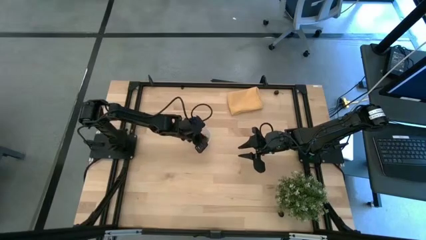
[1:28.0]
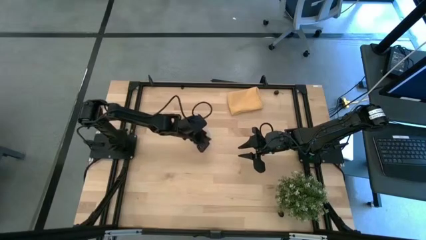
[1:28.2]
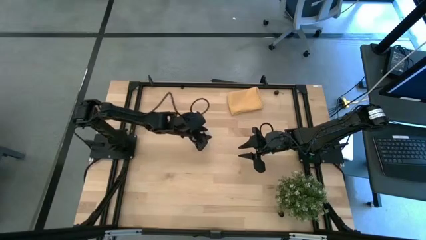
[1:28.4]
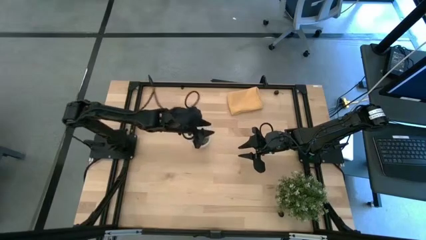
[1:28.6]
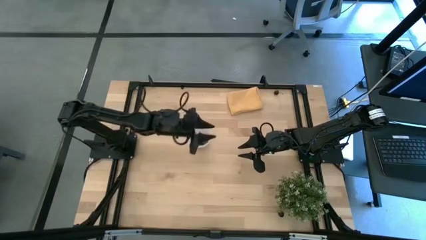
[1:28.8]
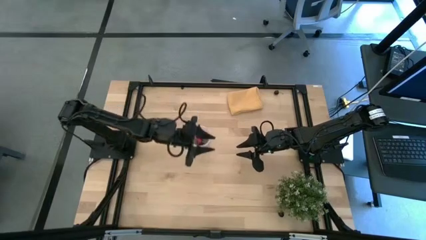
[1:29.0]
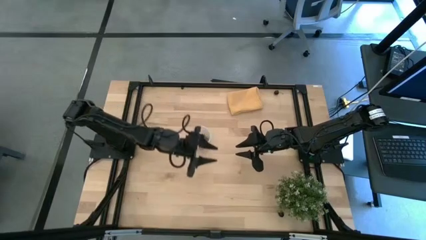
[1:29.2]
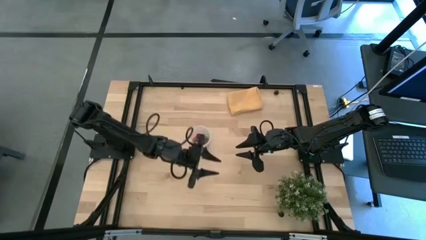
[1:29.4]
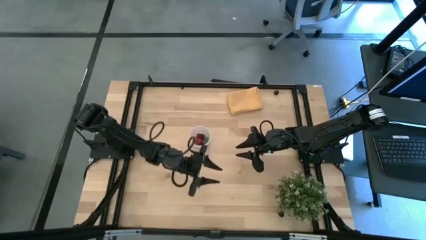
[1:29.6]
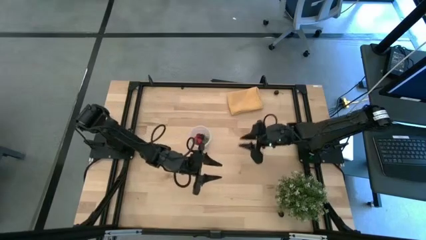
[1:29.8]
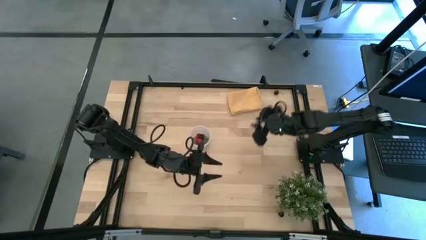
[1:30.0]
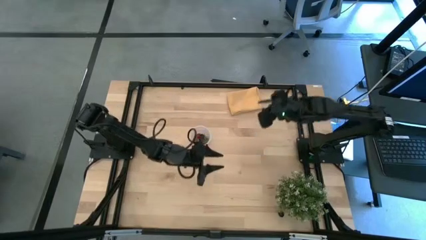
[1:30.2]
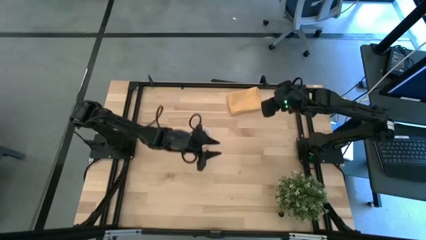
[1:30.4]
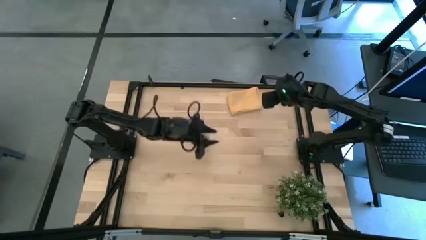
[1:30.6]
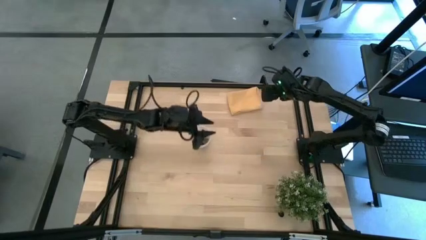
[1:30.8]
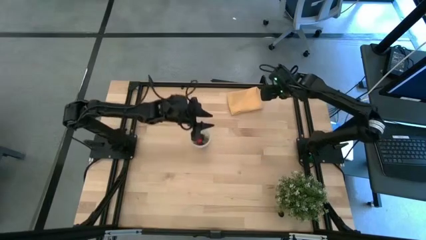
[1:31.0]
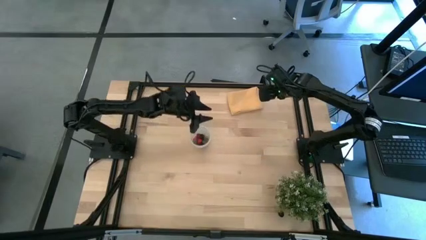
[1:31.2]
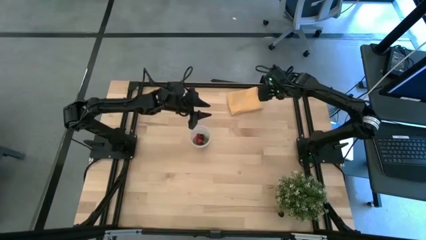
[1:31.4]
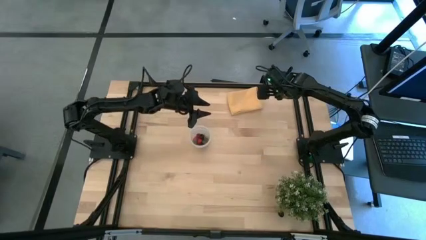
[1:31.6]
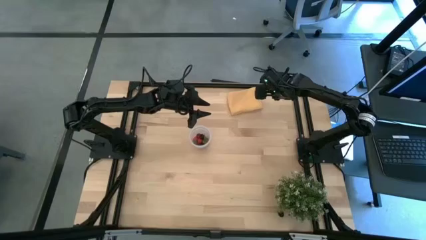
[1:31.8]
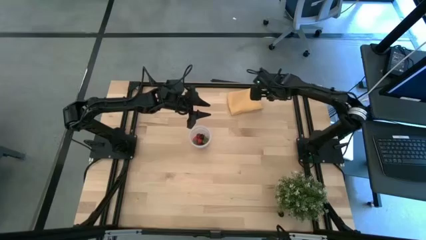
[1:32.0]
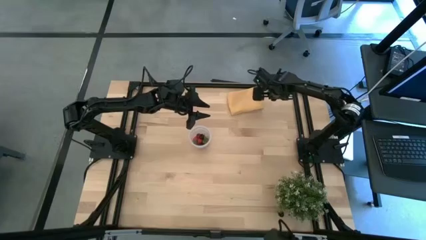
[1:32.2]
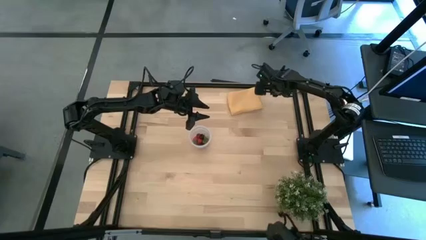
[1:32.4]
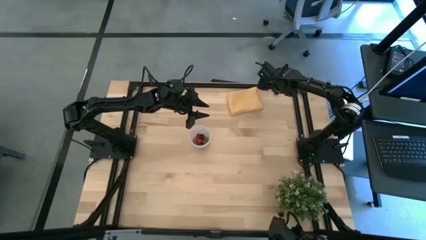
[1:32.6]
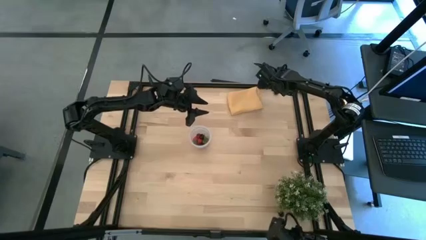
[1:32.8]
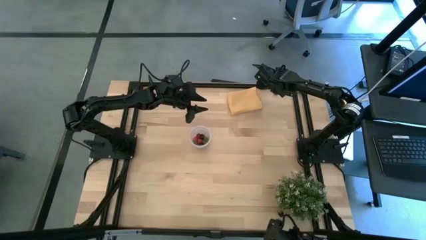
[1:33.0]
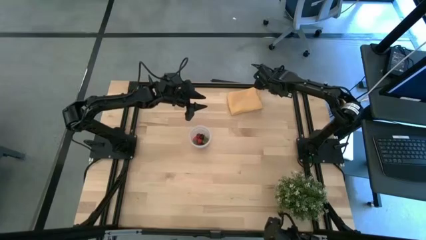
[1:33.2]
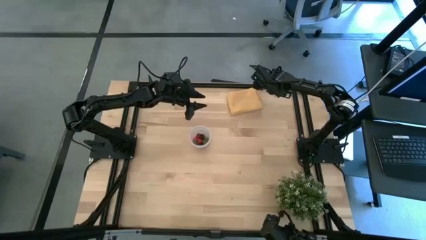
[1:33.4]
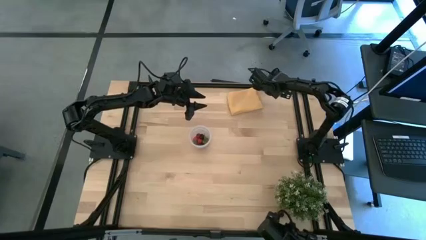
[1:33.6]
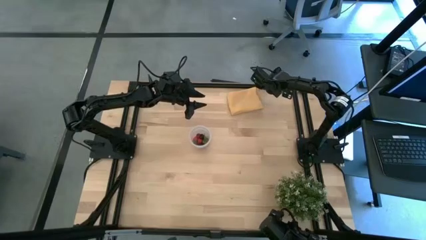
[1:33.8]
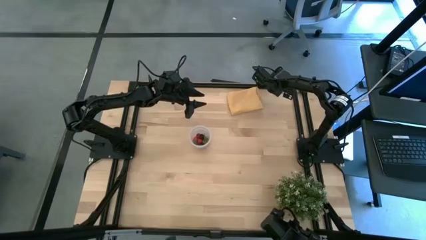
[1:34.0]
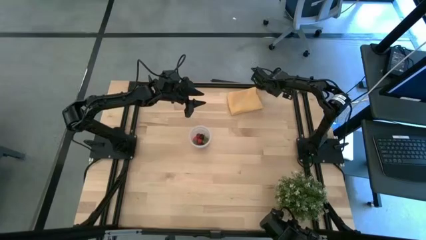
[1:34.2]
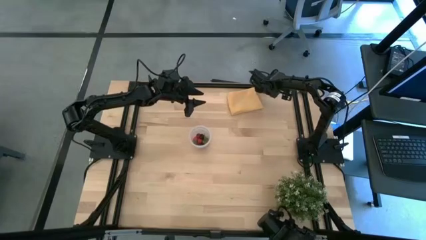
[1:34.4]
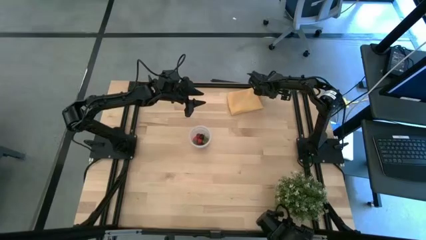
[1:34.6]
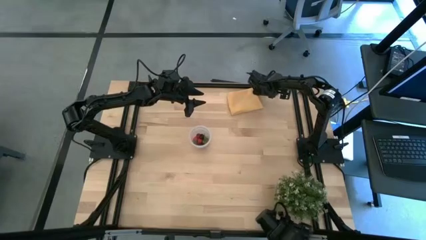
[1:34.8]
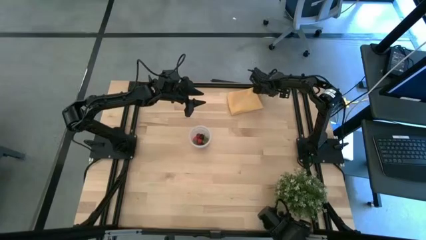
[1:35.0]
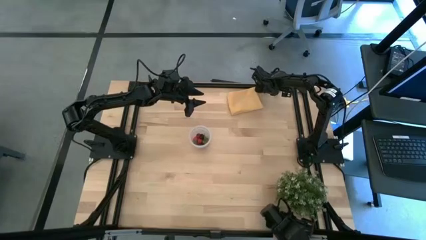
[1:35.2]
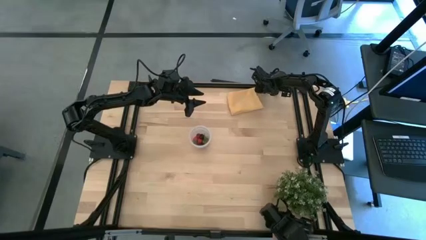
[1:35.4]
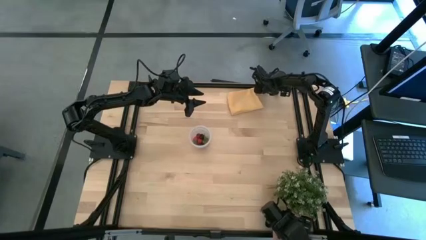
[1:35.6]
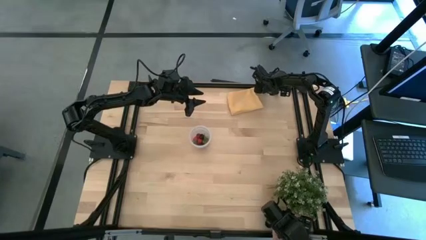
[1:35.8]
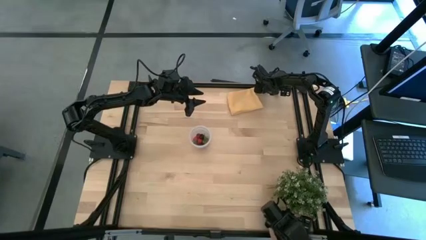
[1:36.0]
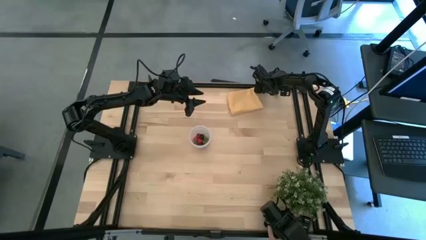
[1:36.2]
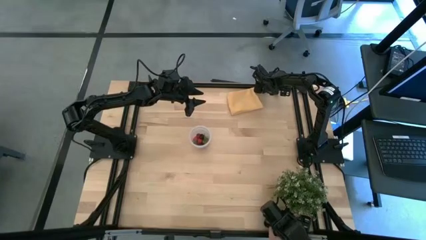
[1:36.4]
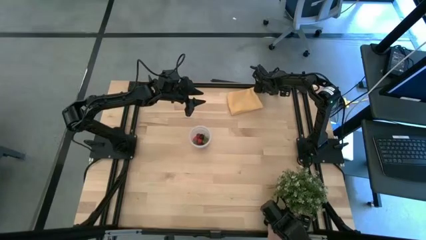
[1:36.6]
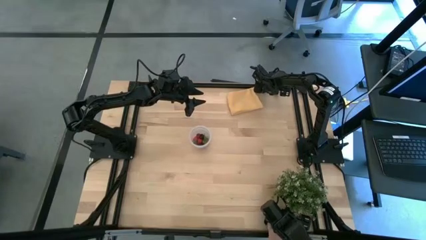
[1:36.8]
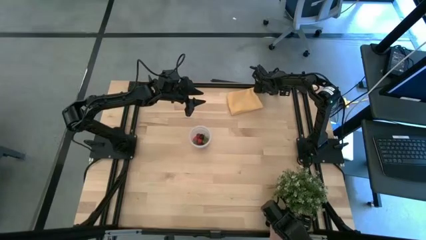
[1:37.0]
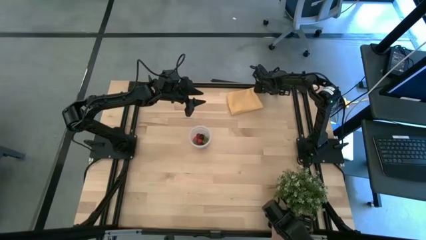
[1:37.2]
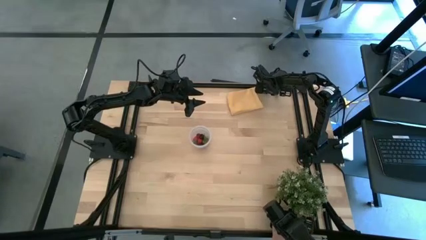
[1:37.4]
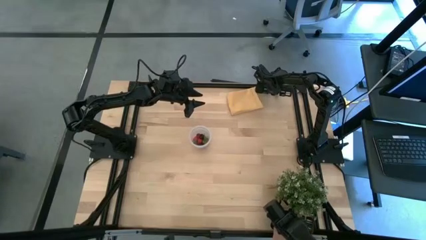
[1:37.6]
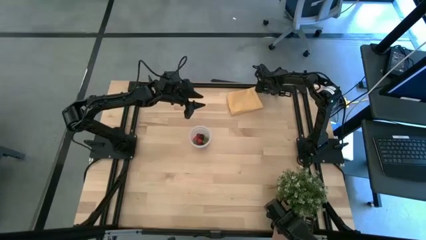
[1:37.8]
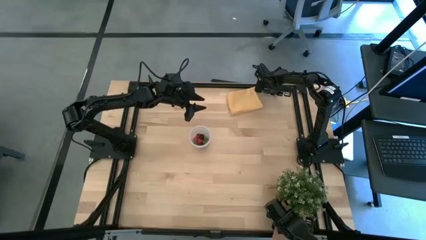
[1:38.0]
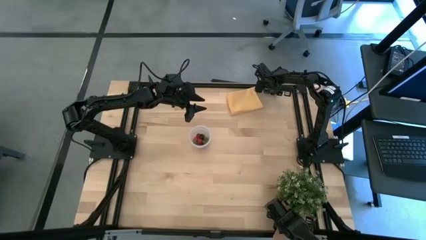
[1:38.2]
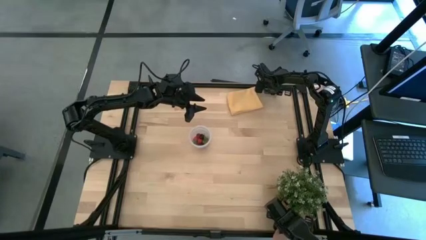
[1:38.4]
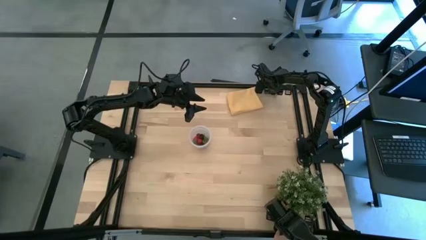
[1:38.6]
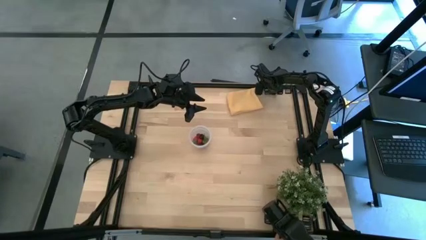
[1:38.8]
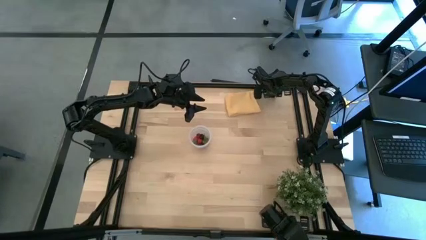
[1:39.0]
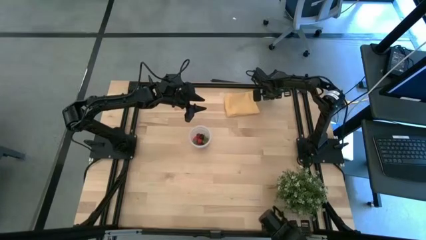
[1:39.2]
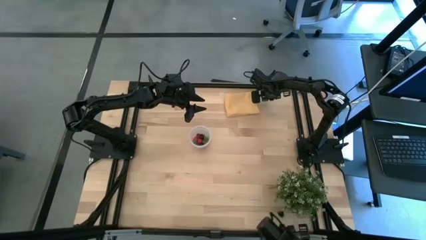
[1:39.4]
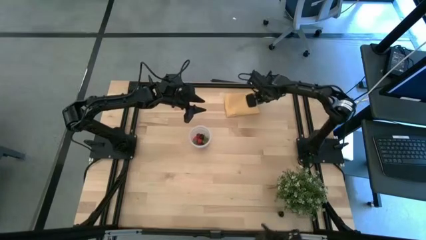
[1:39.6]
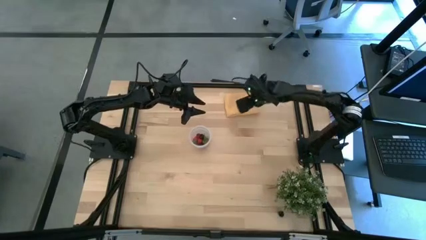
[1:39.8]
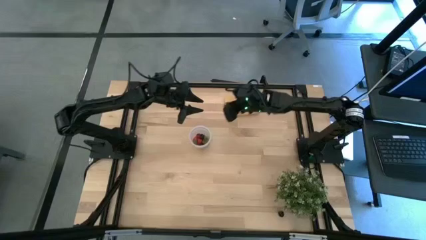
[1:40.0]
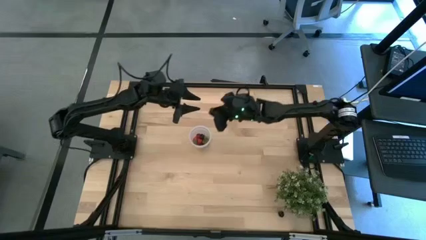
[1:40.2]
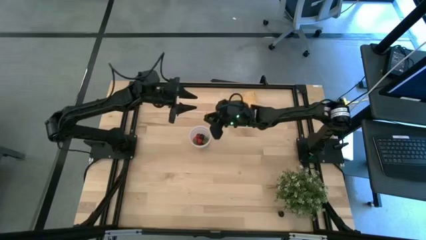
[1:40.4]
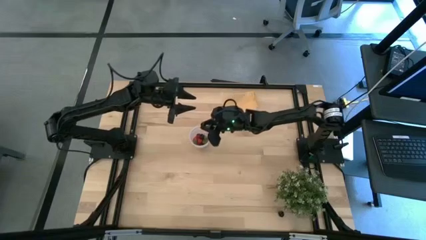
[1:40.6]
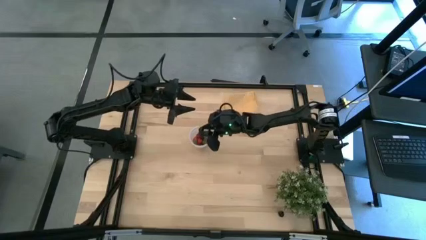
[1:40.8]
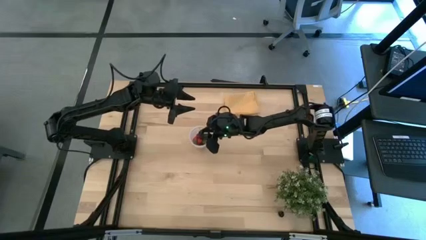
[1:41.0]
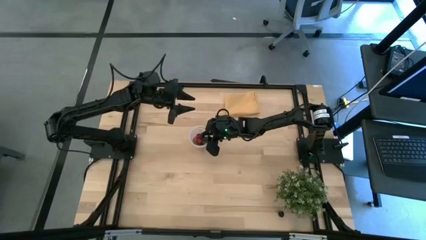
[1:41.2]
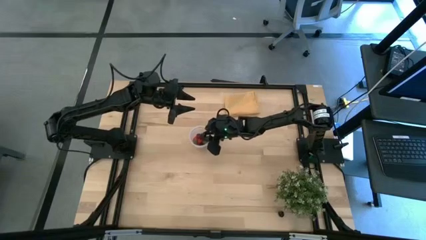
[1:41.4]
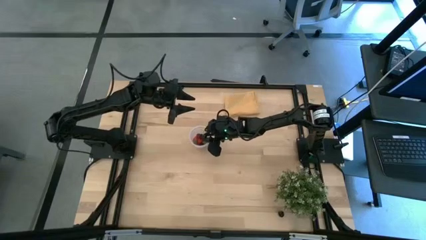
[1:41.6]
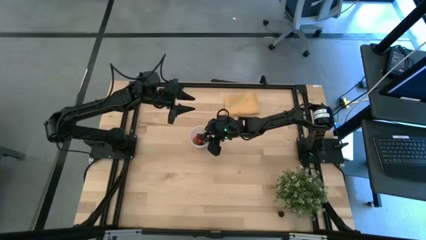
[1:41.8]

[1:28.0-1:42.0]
Task: Pick and placing Produce into tupperware
Put the top black cherry into the transparent container

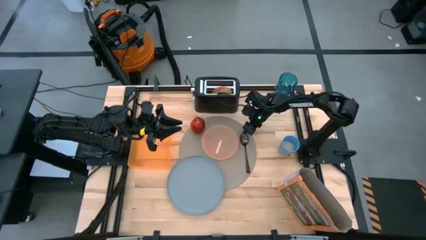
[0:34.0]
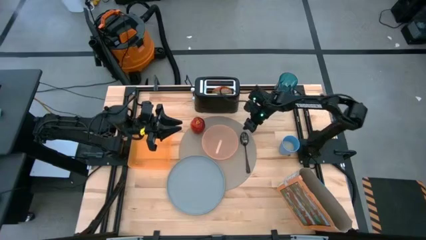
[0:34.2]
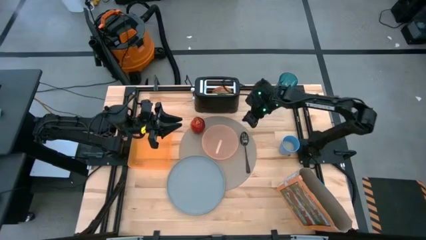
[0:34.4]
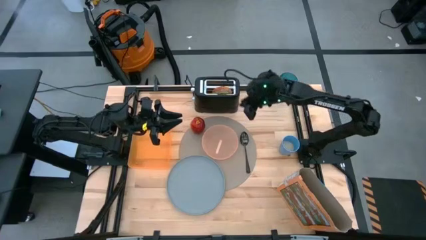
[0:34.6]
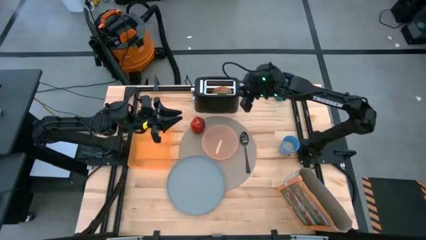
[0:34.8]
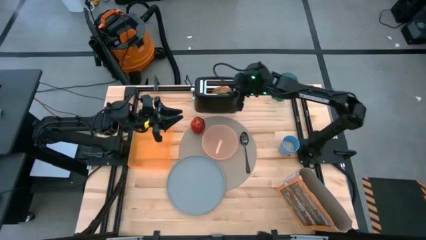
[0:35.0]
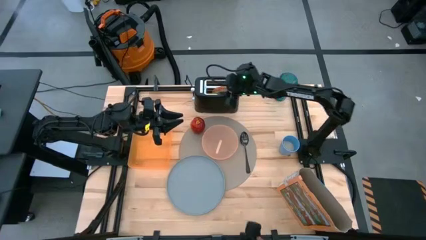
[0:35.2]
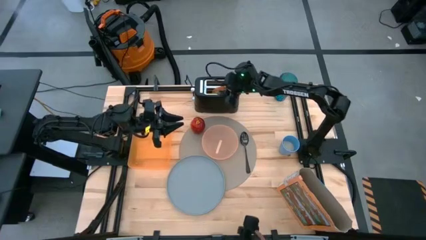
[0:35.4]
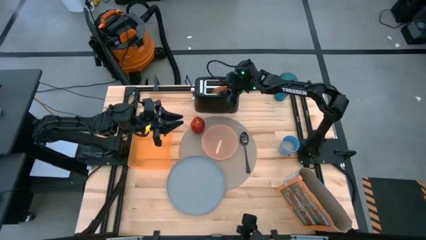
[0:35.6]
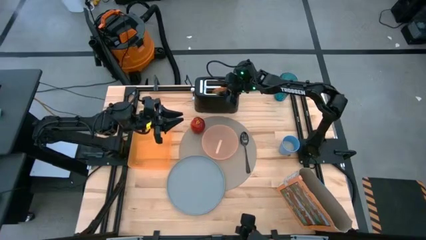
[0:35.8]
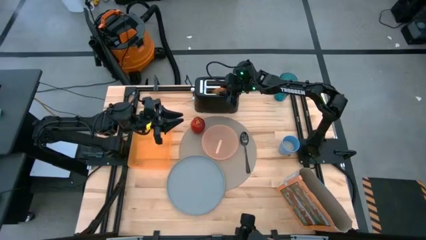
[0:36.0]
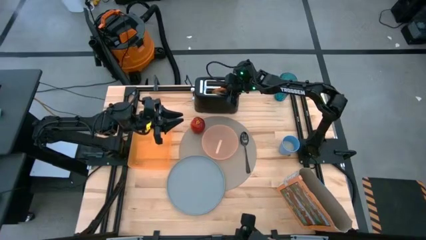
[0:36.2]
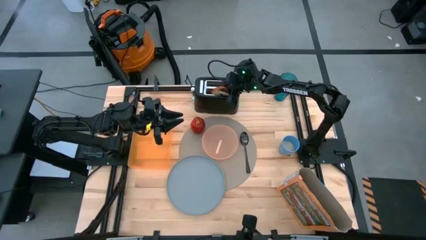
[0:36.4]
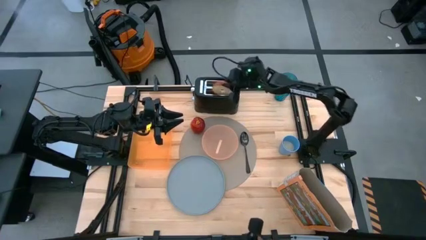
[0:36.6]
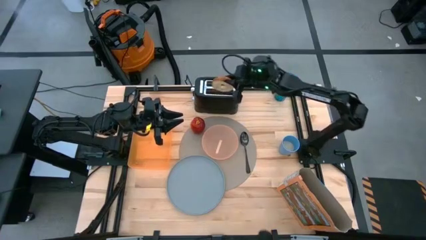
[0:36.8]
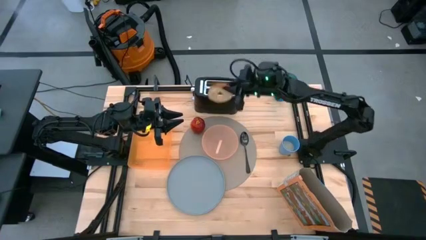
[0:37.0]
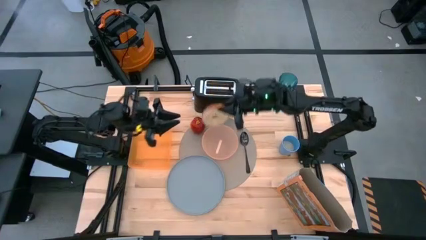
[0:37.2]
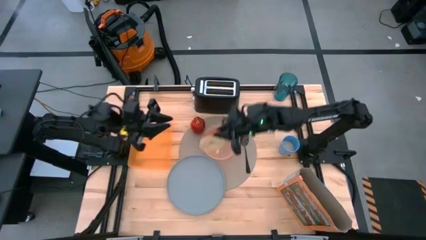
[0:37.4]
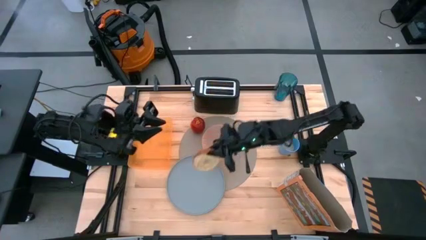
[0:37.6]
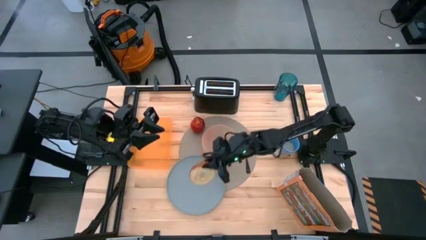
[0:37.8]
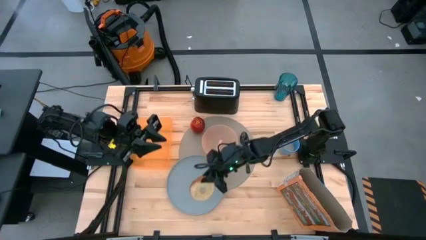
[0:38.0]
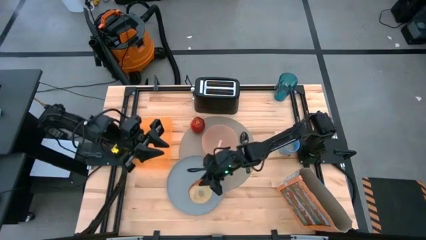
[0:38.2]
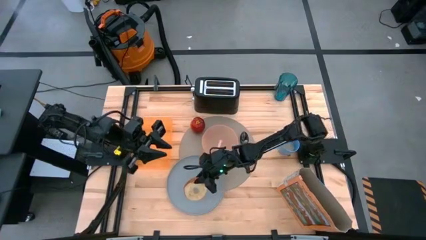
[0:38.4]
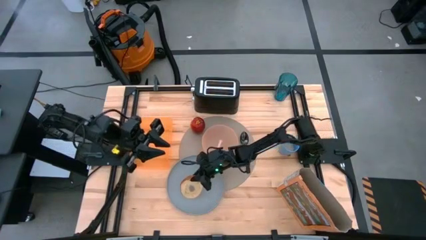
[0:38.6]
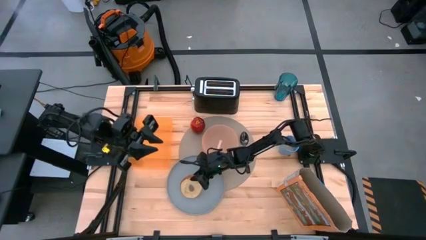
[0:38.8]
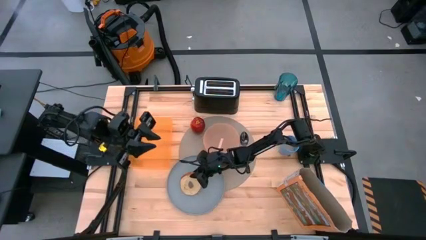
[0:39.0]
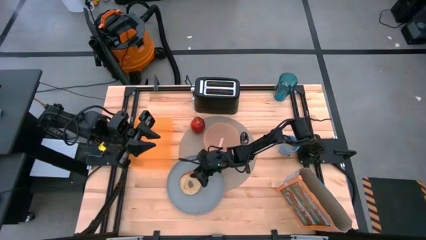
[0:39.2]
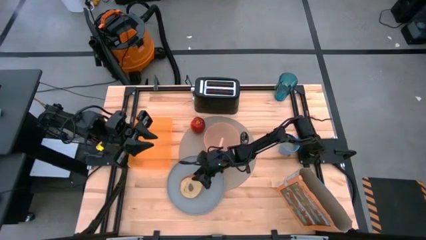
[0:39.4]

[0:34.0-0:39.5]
Task: Arrange a breakfast setting
Put the toasted bread from the toaster on the blue plate
